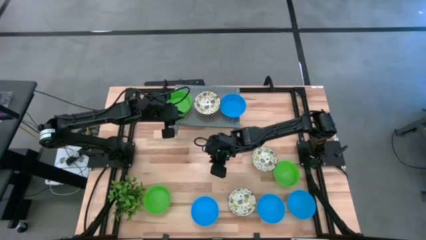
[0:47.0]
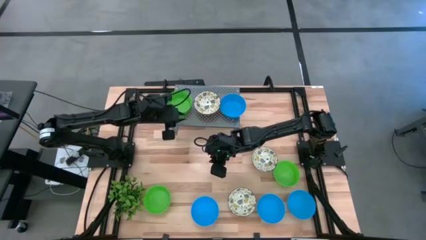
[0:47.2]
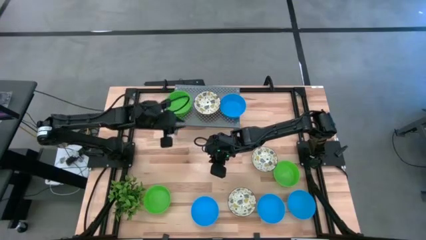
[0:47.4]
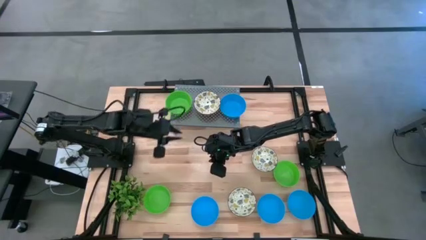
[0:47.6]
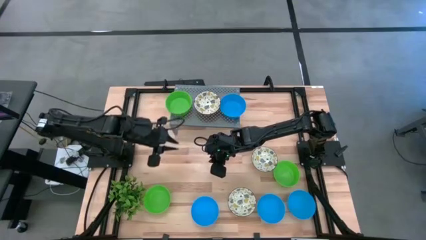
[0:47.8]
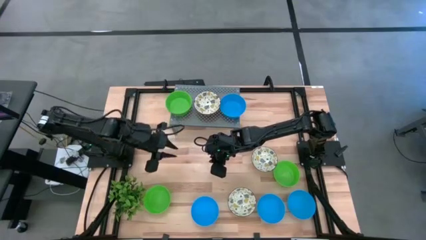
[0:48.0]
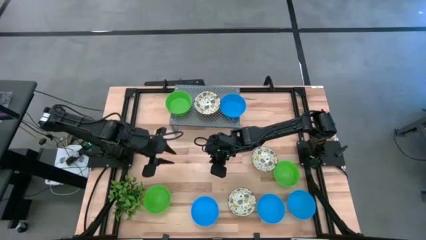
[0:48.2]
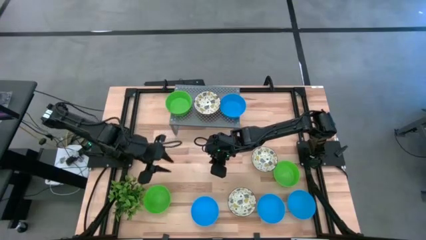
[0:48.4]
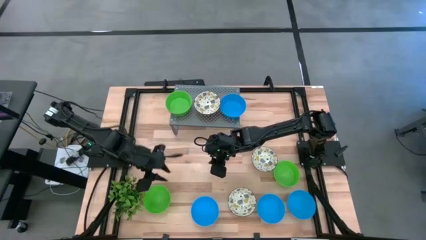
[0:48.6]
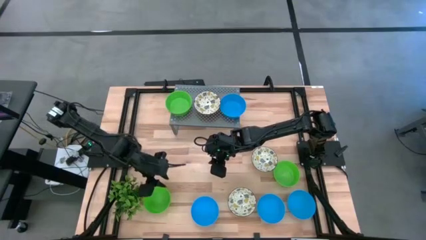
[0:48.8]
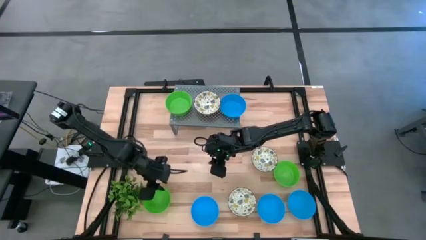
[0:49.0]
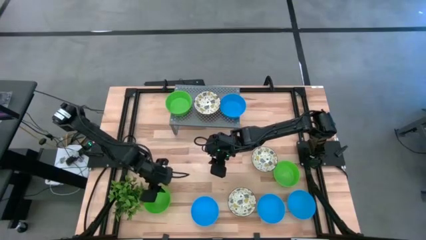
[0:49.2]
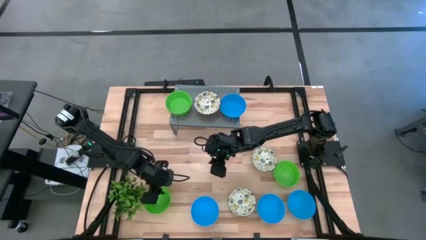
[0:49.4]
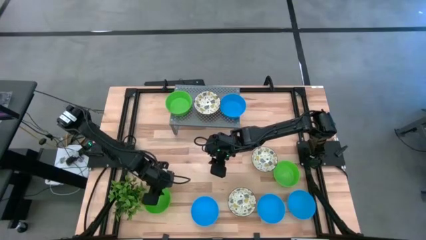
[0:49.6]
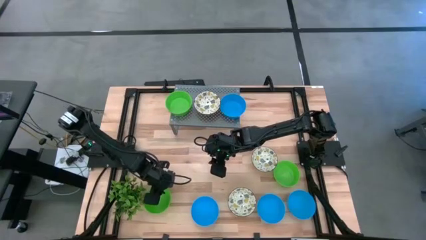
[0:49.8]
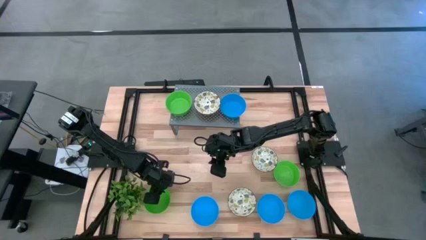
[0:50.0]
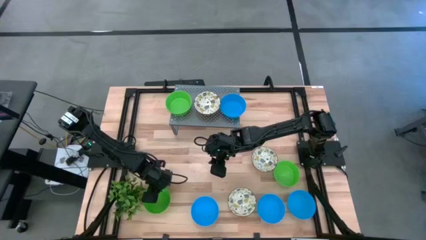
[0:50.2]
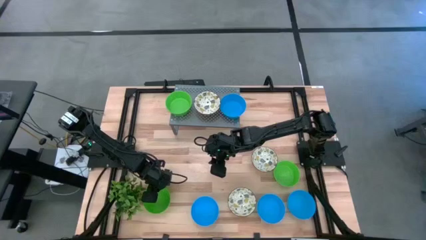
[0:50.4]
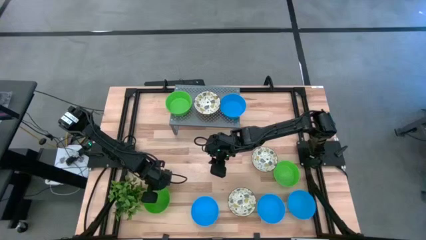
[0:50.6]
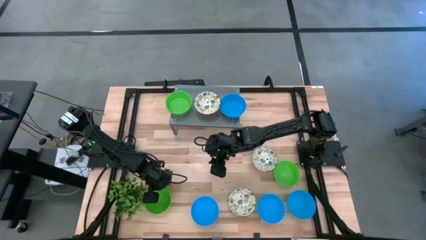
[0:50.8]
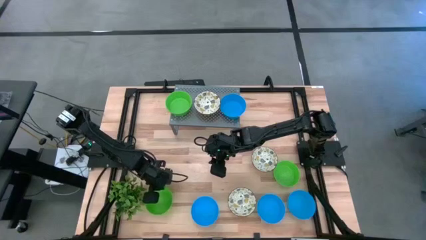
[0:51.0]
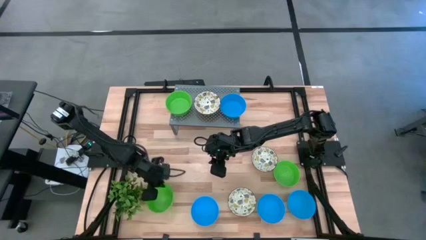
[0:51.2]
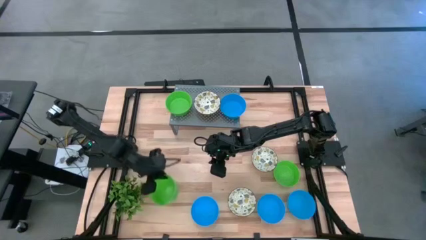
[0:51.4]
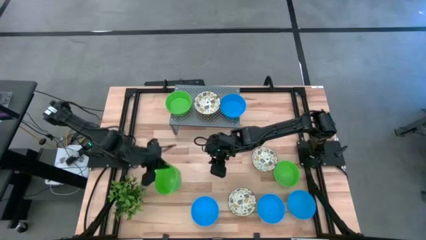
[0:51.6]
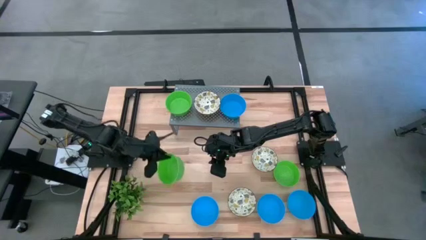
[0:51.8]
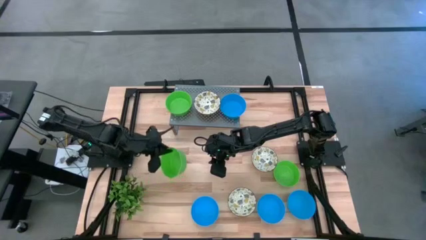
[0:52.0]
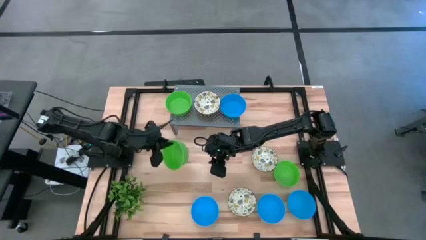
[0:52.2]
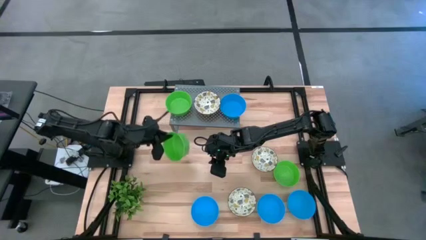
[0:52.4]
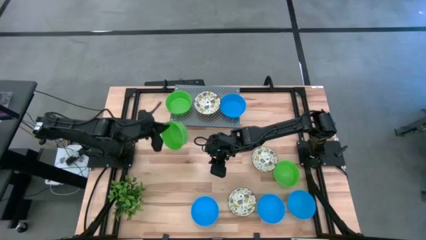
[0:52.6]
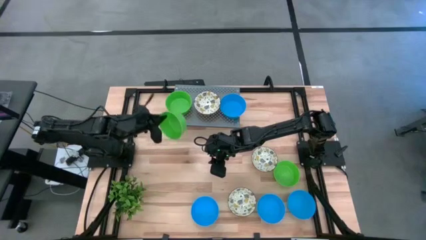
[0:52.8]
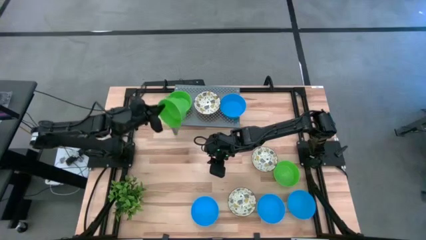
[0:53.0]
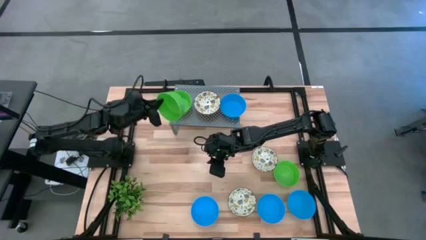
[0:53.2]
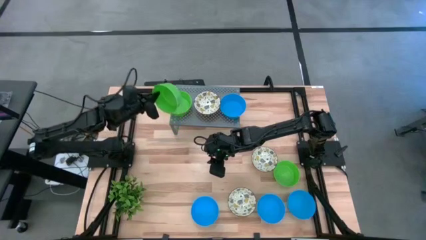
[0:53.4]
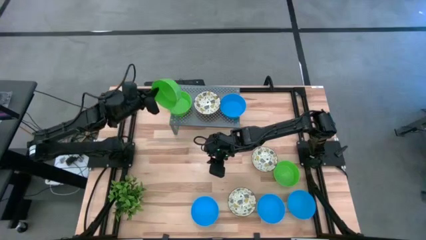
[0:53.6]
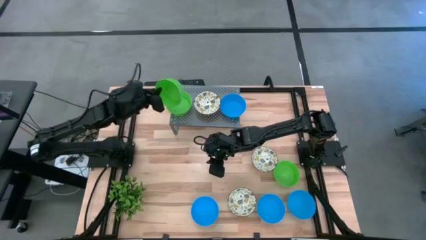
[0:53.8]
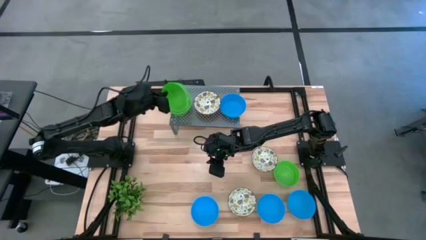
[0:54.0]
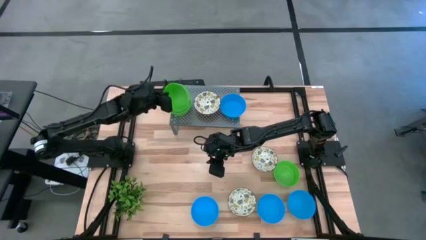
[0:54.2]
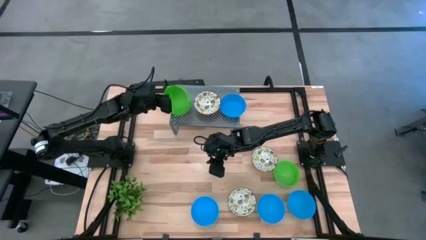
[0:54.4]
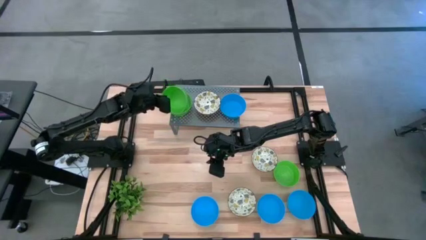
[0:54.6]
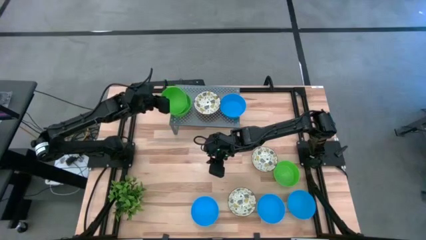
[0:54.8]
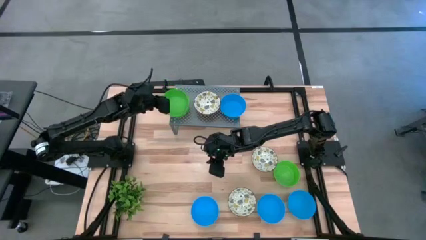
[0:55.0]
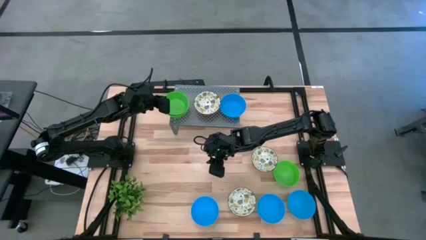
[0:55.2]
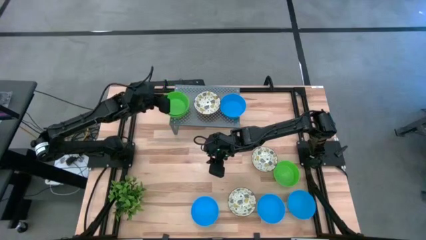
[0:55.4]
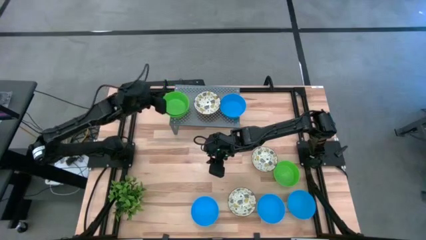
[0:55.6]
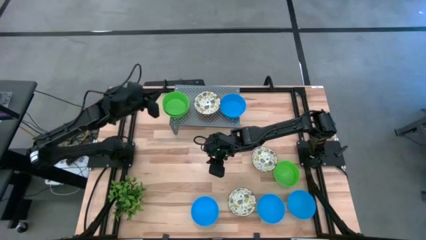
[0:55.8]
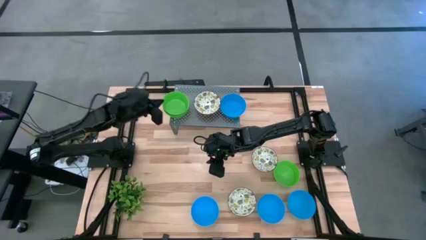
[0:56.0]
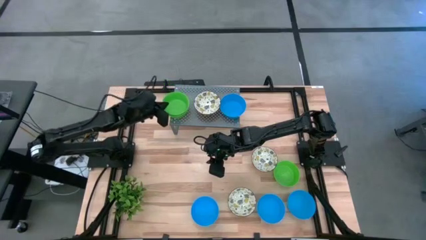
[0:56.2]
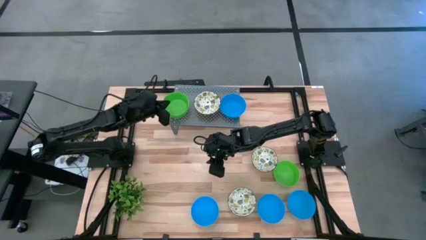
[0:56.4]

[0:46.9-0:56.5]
Task: Pick & Place Mini bowls
Stack the green bowl on top of the other green bowls on the shelf

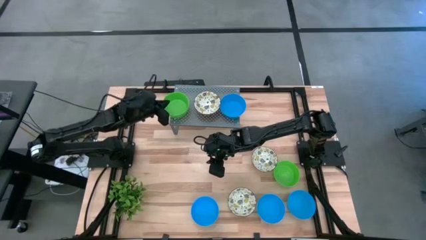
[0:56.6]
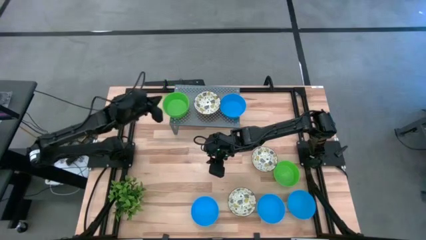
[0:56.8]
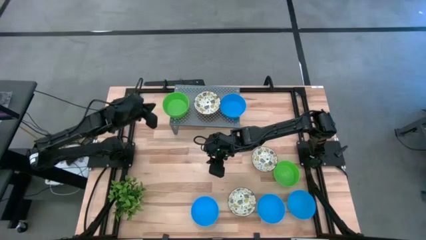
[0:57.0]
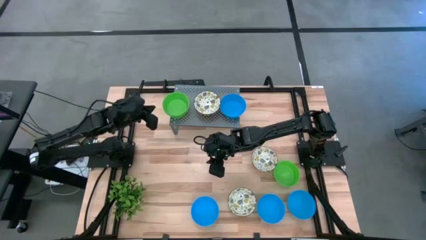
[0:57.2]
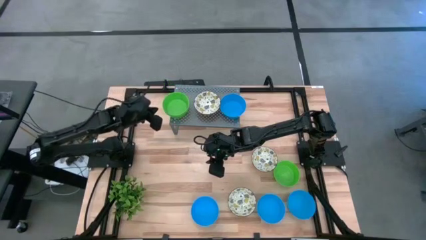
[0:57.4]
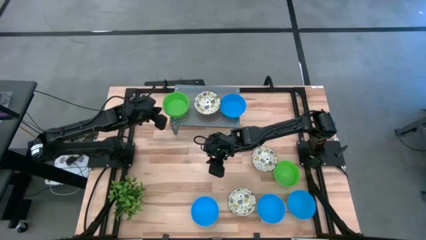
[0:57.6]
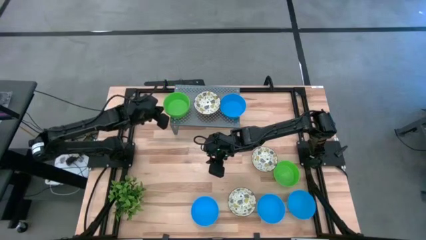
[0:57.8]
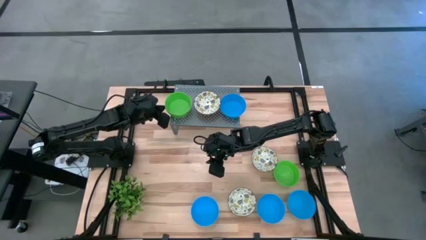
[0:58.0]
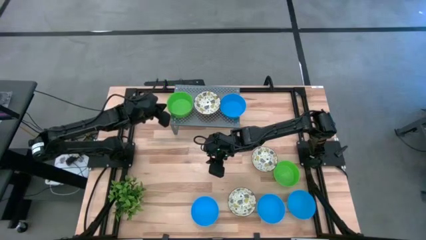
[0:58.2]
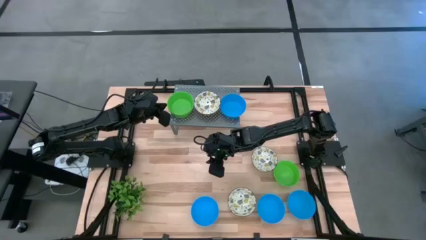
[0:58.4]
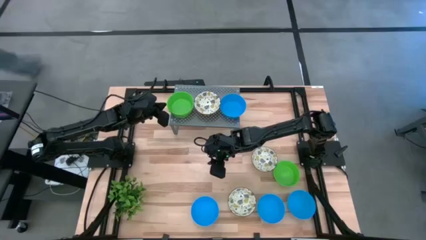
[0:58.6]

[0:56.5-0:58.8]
Adjust the stacked green bowls on the shelf

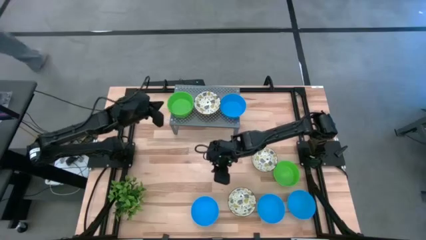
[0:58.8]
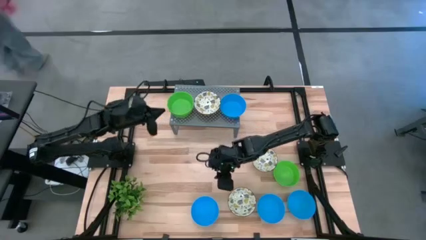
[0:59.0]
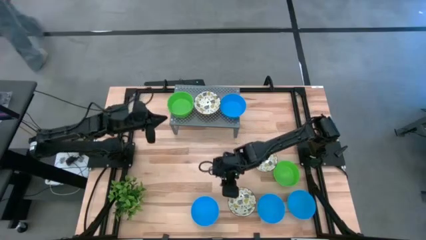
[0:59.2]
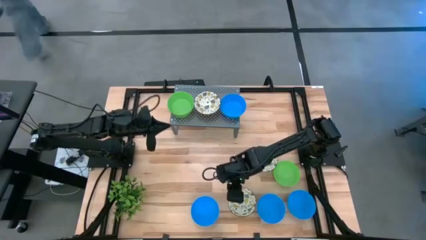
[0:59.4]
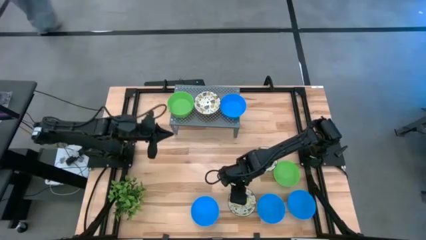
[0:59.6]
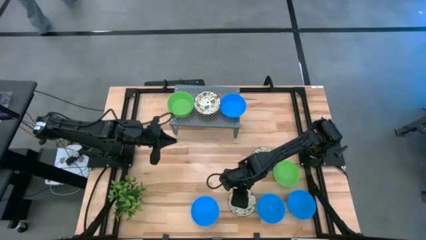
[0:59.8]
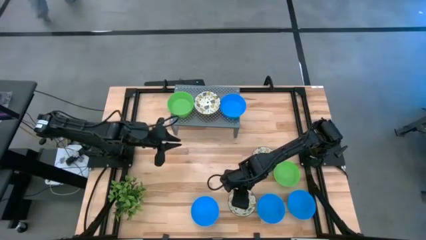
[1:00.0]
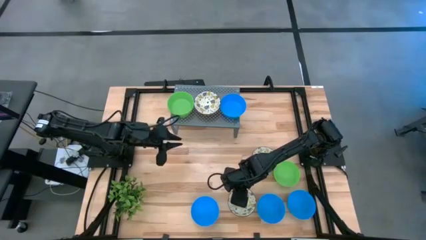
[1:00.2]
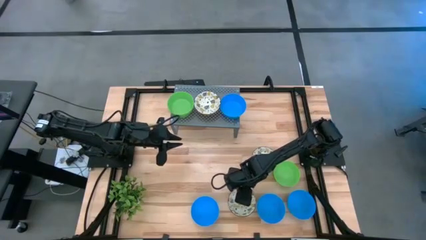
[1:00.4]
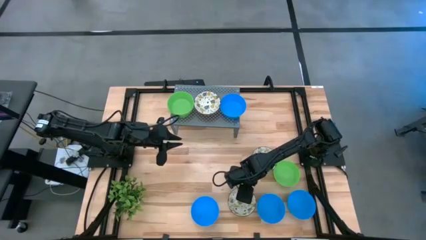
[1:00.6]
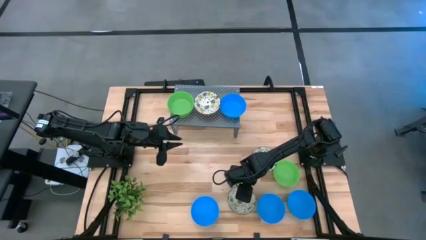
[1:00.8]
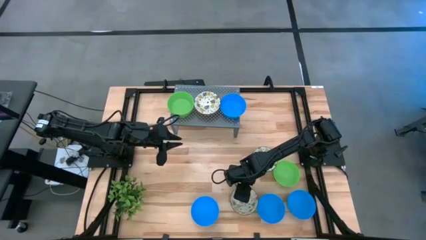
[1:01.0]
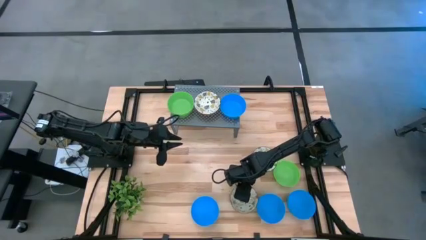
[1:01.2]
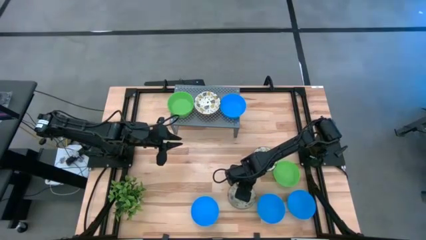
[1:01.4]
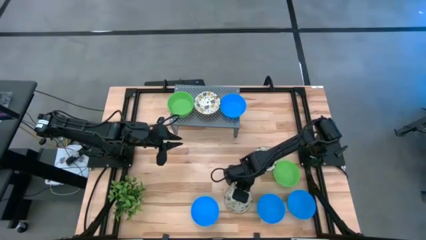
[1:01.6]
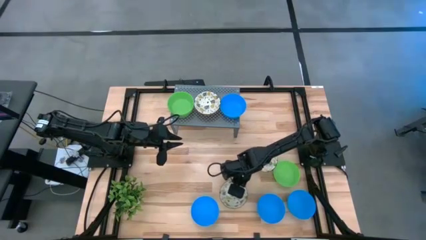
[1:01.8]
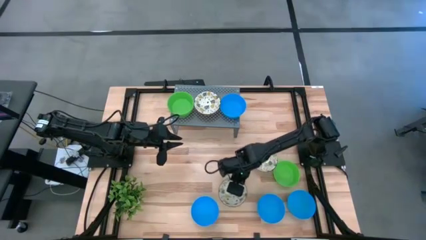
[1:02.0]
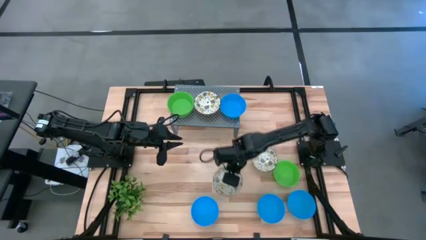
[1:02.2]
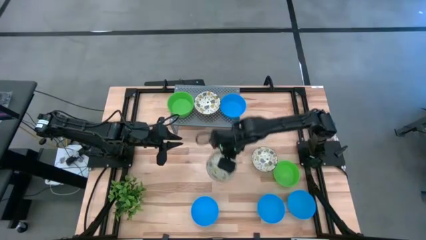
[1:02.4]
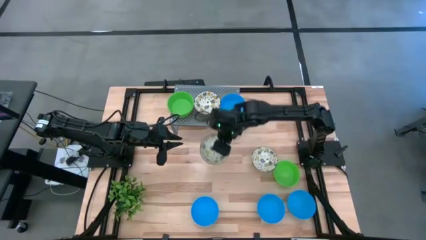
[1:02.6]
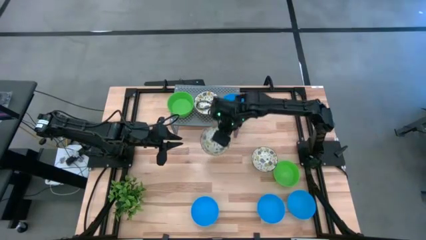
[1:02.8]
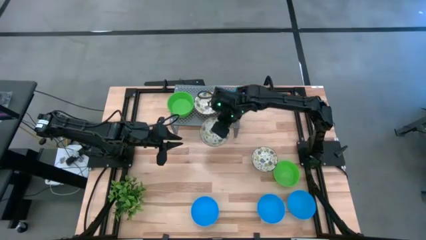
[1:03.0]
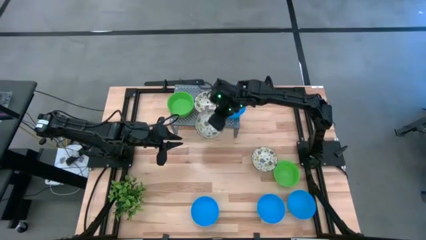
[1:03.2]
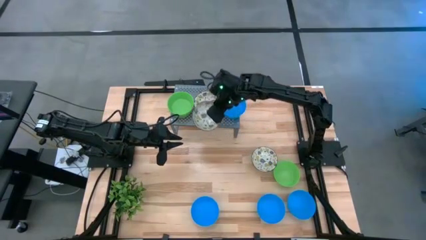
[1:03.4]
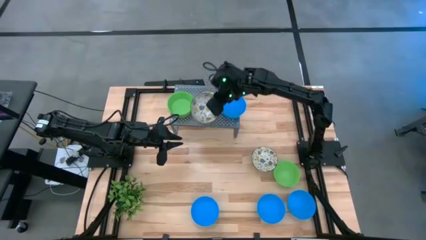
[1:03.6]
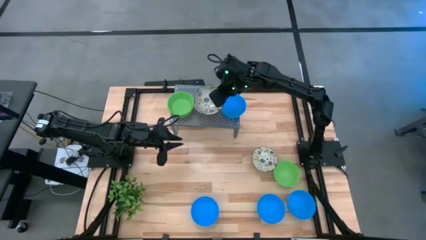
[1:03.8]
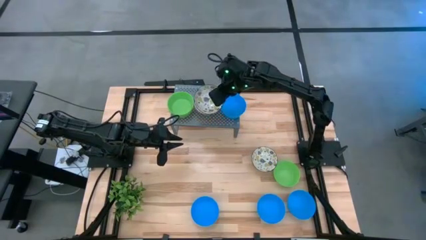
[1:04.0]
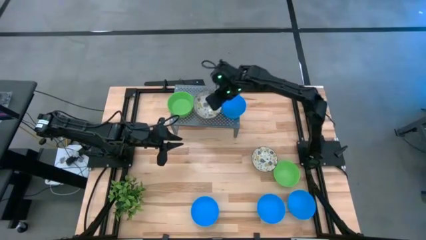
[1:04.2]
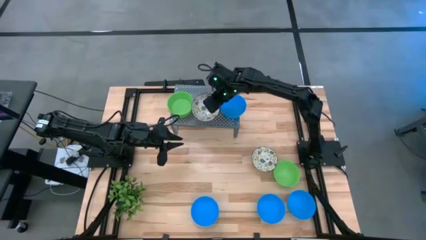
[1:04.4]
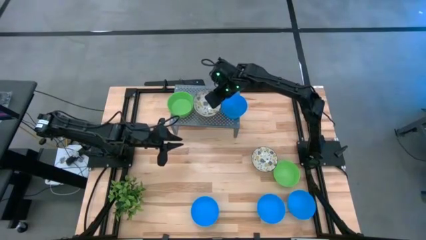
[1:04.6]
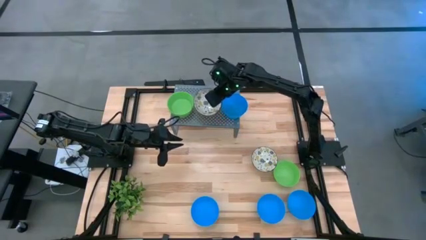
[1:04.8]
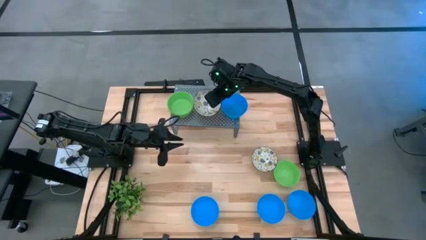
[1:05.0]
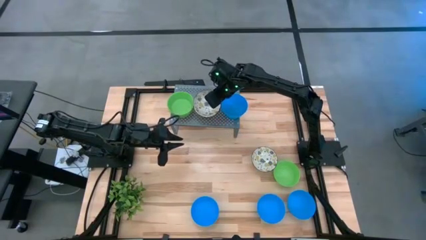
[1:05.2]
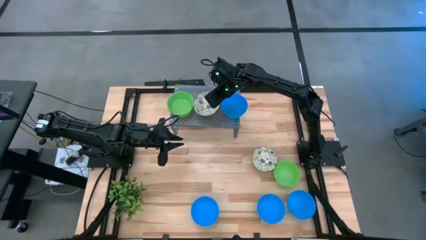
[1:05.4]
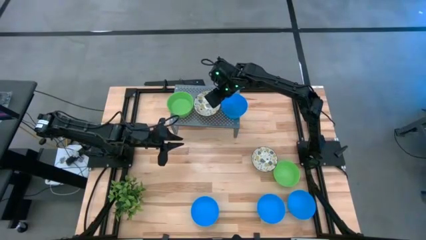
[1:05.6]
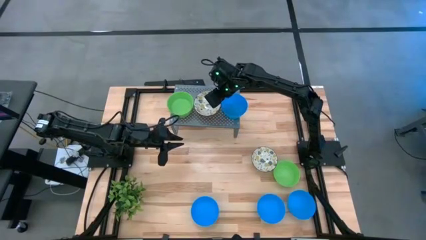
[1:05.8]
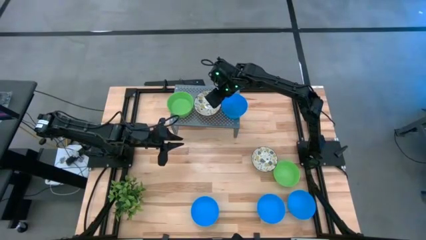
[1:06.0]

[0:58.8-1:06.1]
Stack the white patterned bowl on top of the other white patterned bowl on the shelf
